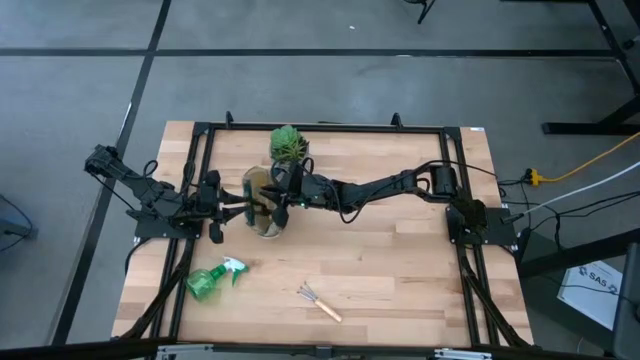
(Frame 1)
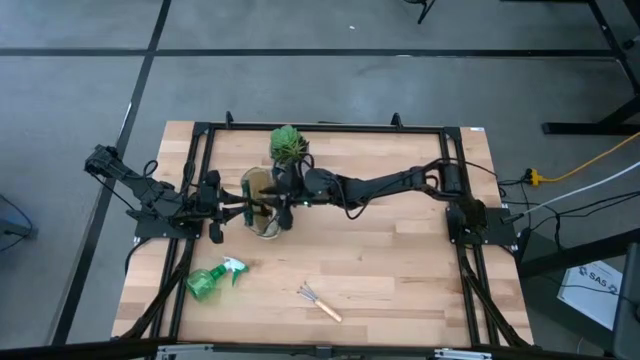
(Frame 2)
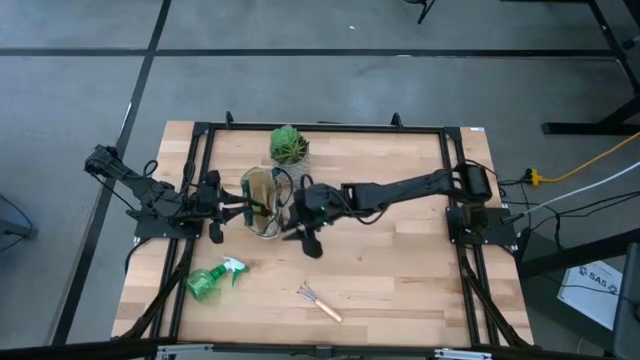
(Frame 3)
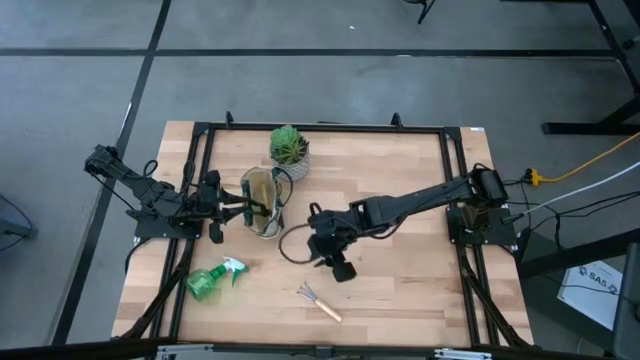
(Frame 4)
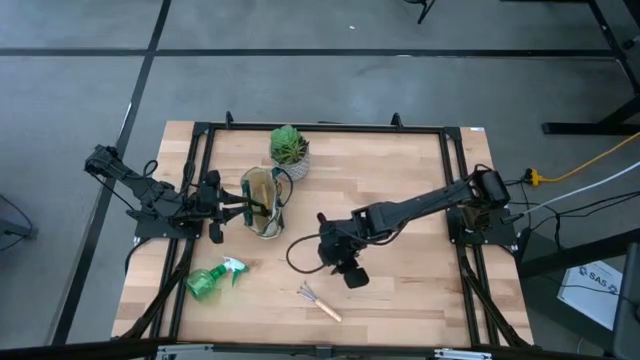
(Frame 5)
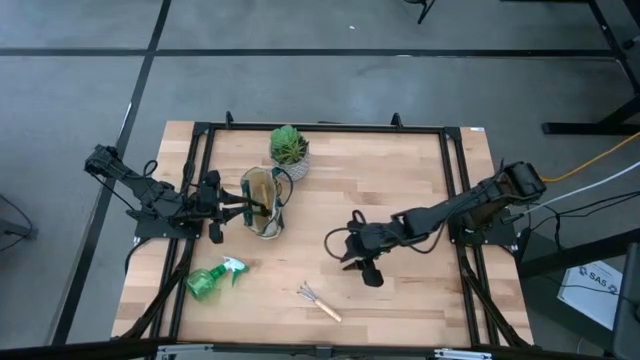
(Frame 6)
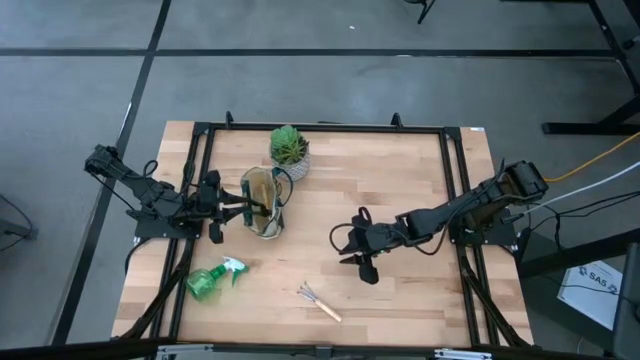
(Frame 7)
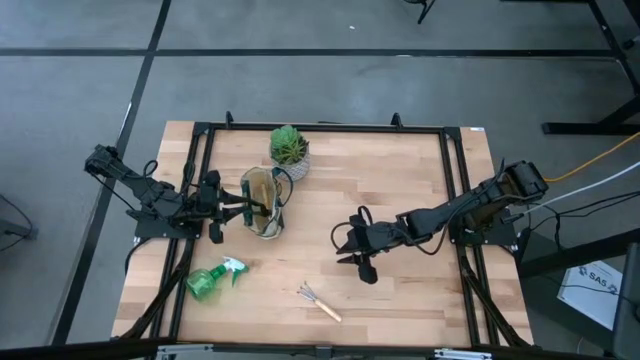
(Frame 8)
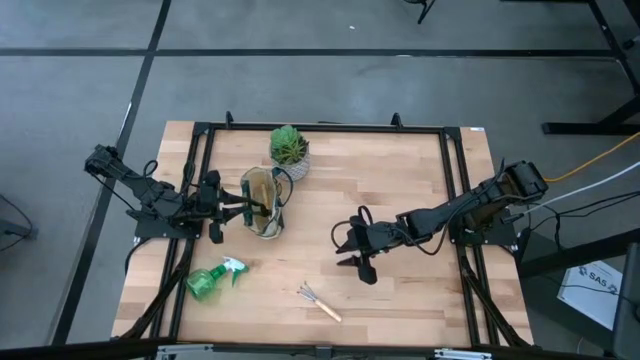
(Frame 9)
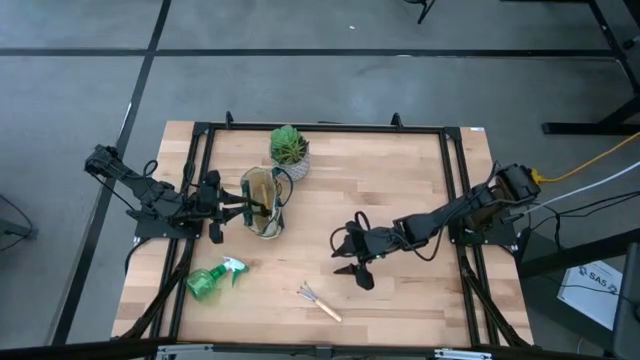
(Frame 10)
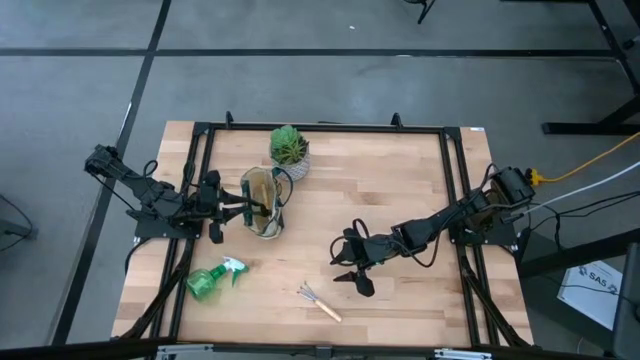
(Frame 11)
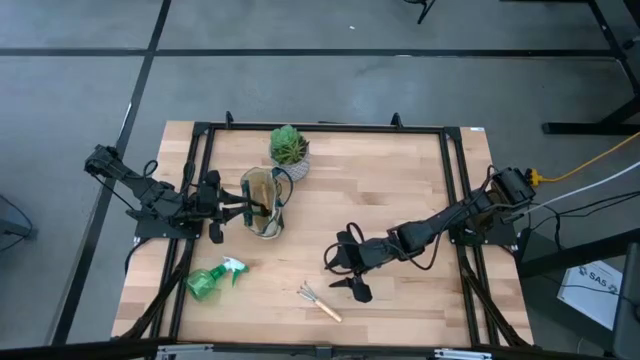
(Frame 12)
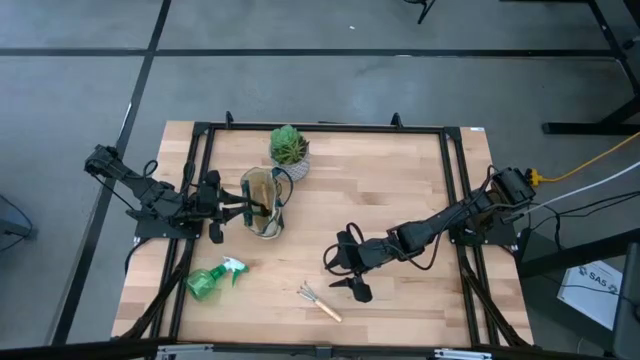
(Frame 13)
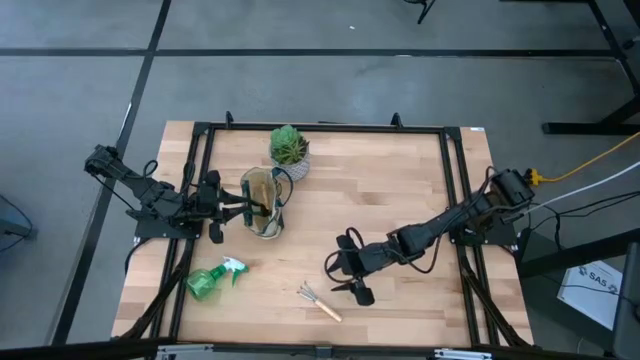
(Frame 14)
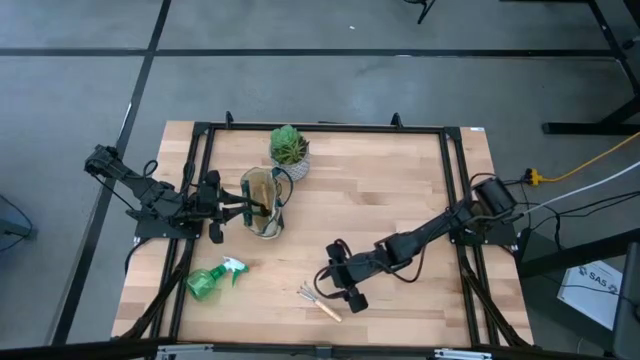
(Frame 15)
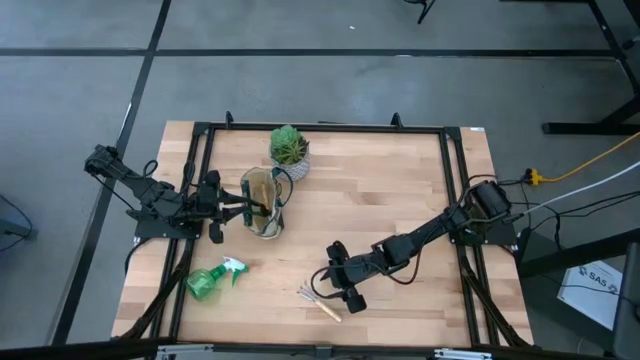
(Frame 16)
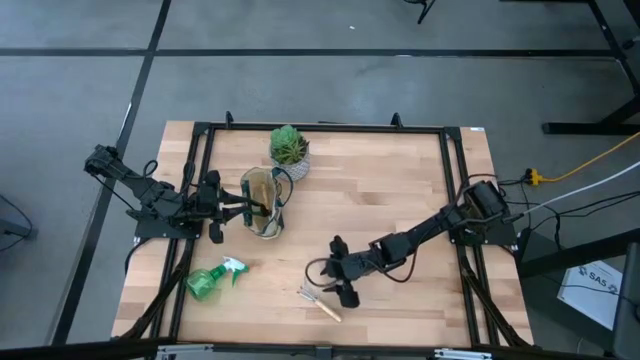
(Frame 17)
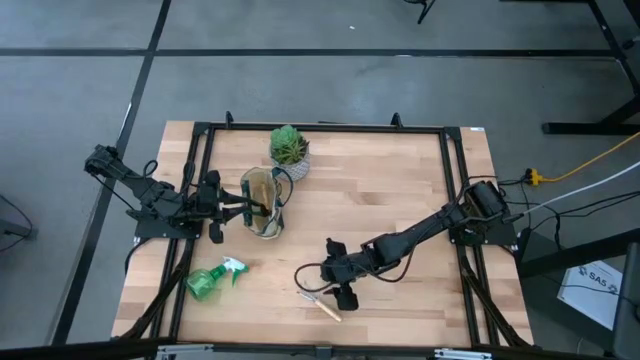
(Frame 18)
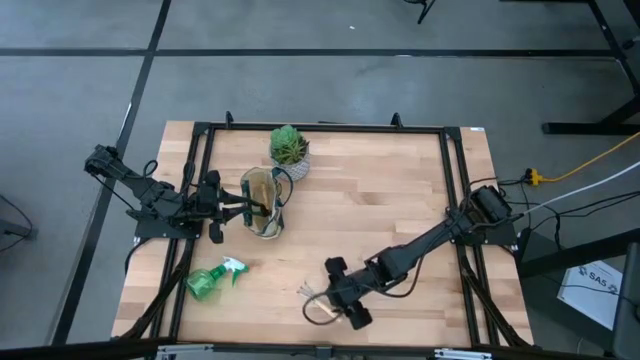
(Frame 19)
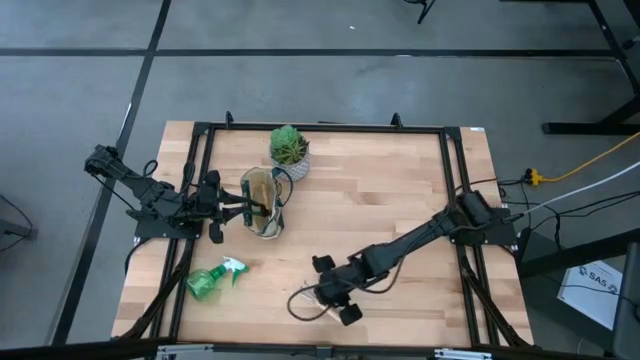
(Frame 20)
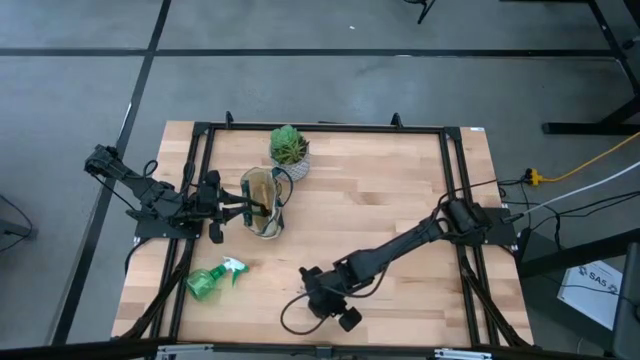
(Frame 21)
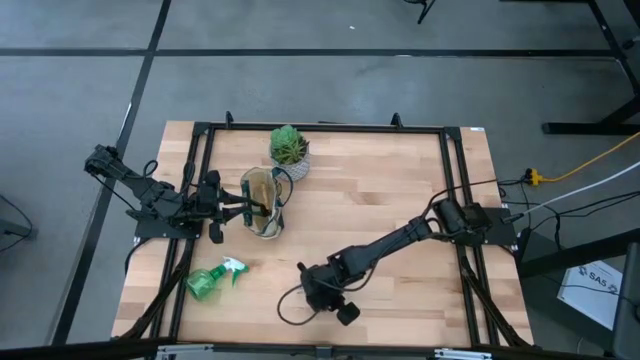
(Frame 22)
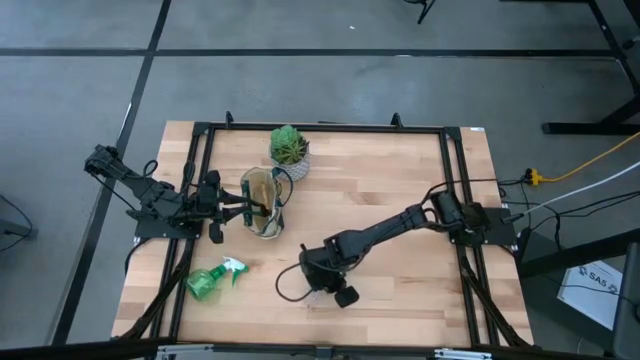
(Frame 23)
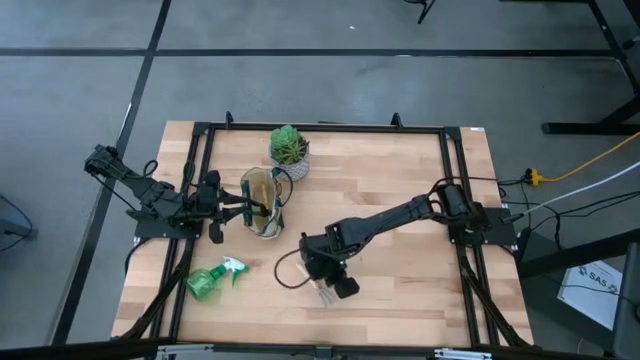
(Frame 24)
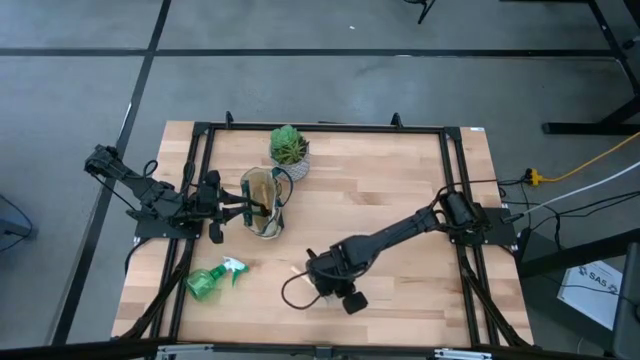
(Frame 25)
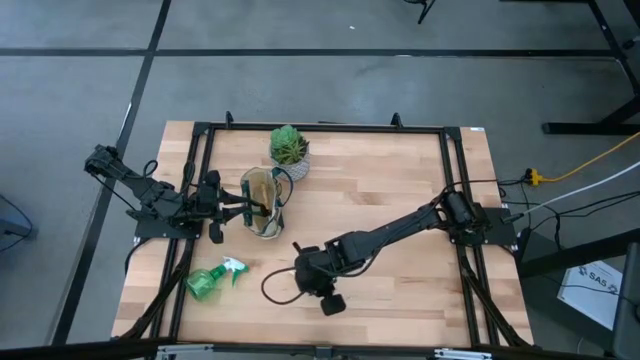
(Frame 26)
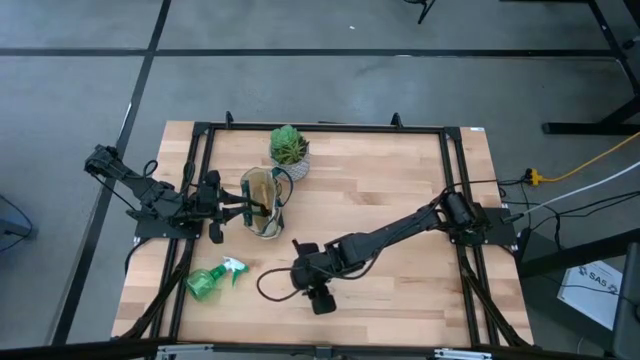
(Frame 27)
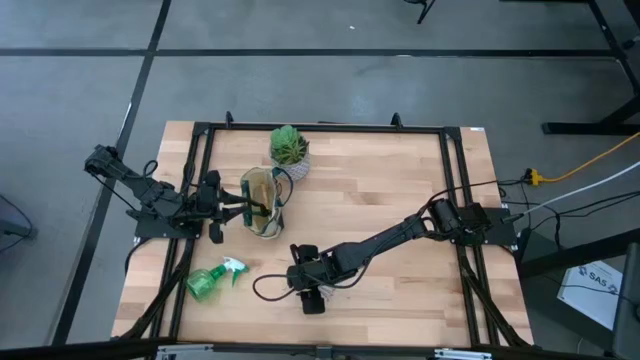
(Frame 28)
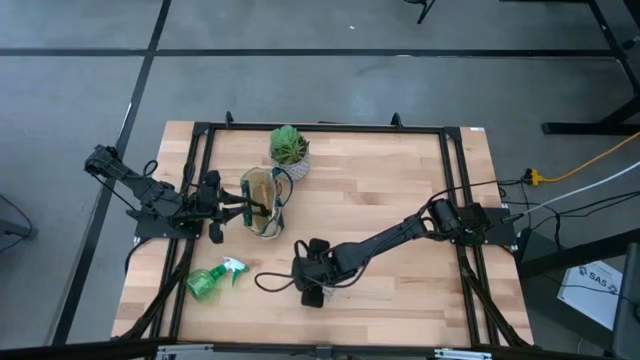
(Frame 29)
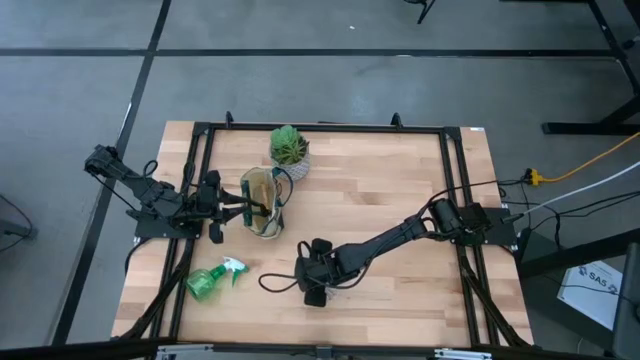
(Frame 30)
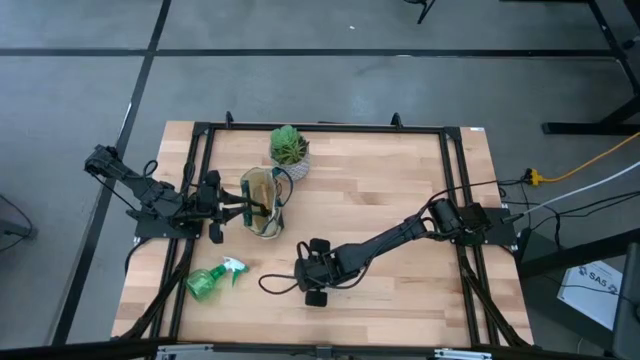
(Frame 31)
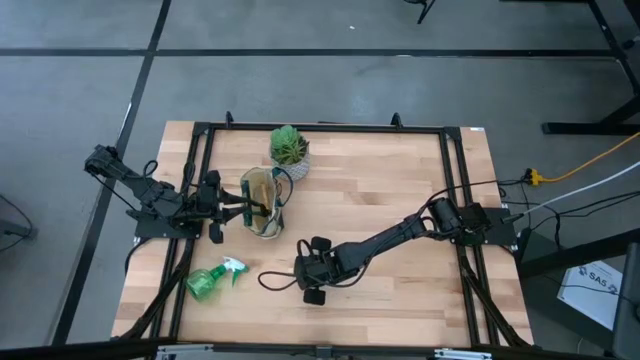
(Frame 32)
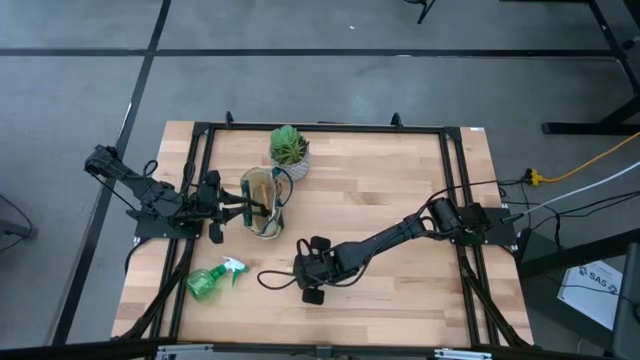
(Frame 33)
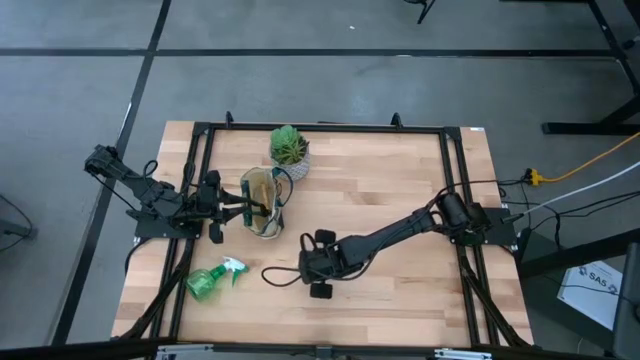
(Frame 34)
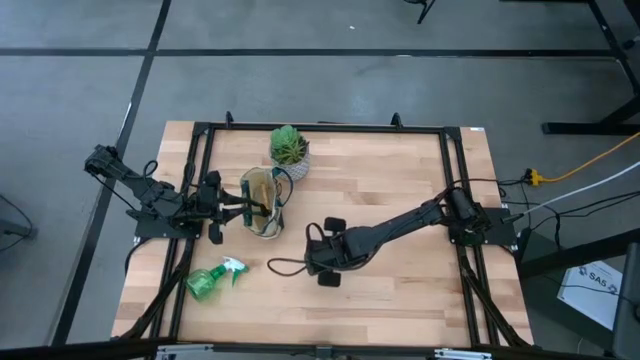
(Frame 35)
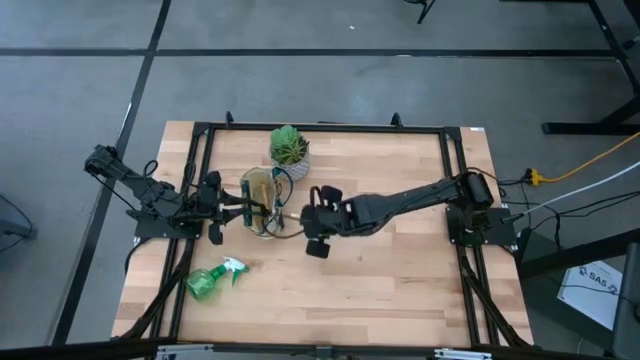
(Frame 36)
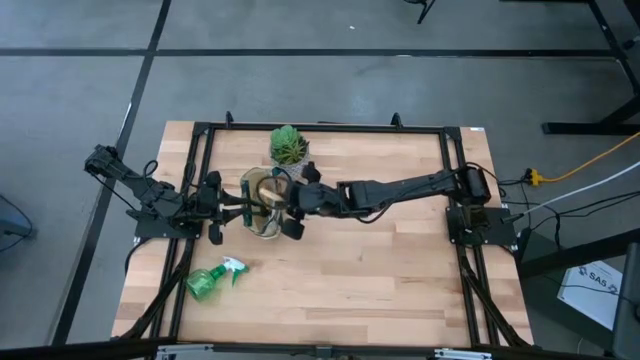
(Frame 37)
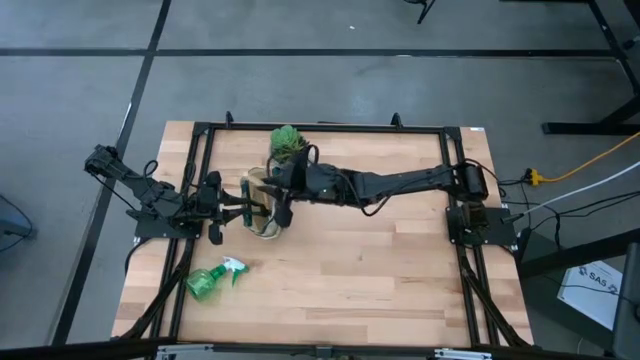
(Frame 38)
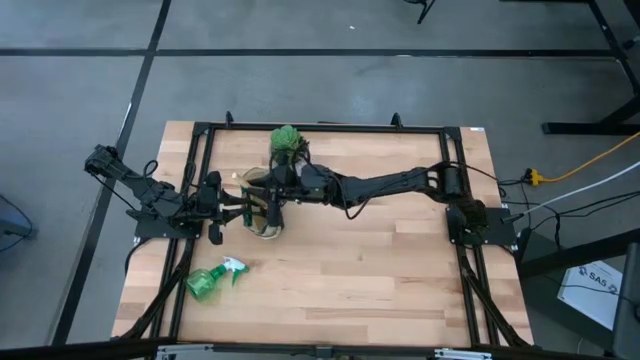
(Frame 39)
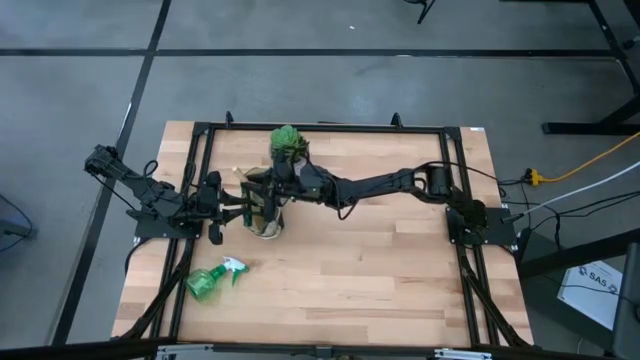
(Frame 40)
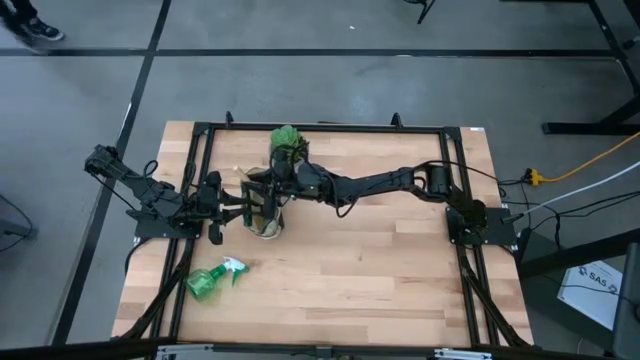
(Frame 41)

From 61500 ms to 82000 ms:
Task: Pick & Place Garden tools in Gardening bag
Put the hand rake into the gardening bag

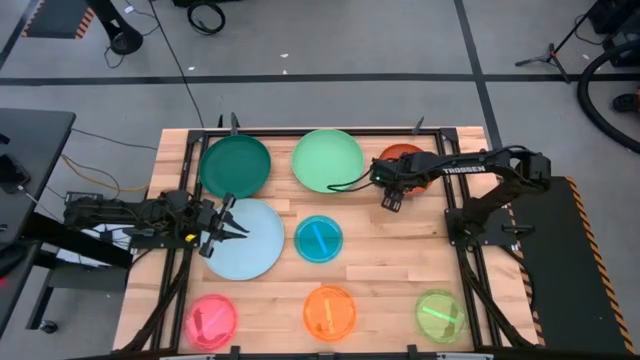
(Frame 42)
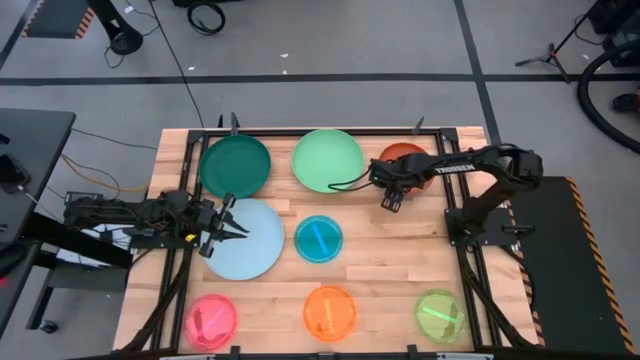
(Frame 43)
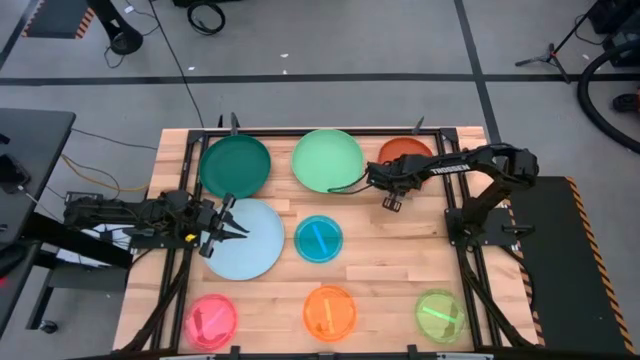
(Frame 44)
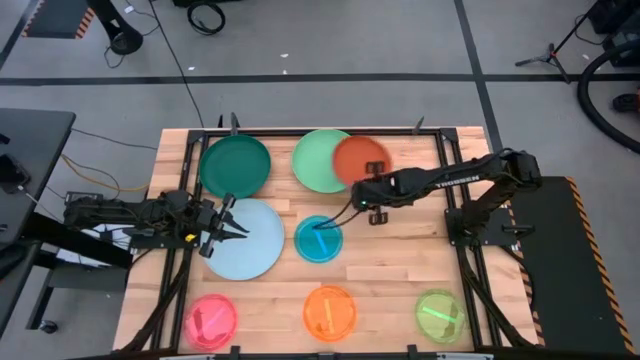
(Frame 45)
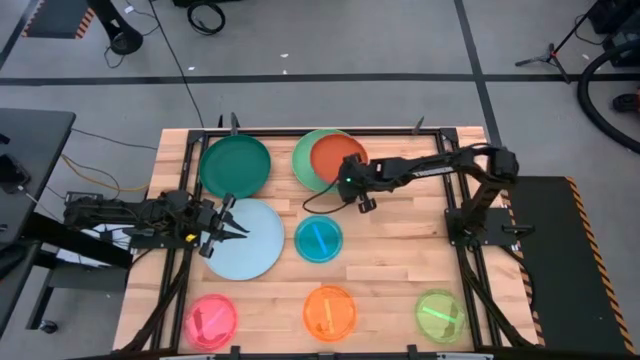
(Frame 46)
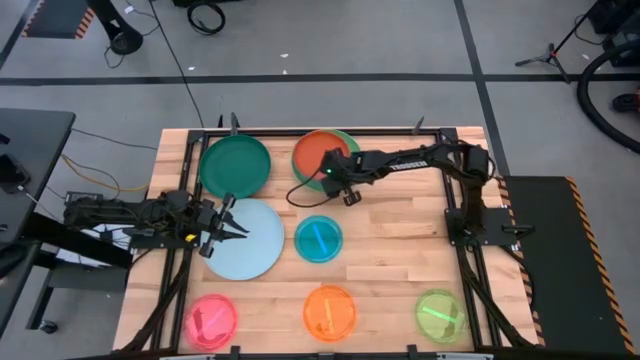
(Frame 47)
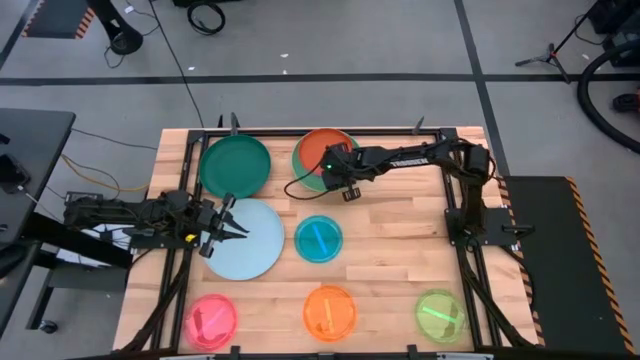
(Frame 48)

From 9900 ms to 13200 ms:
Task: Stack plastic plates
Stack the stacked plates on top of the green plate
